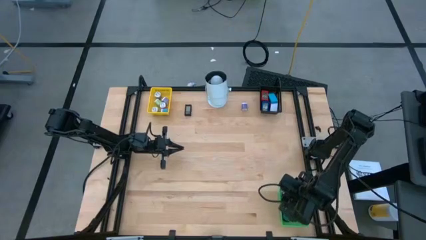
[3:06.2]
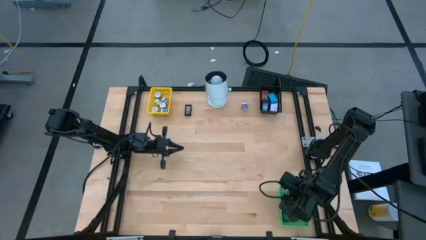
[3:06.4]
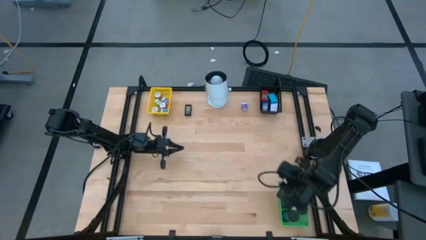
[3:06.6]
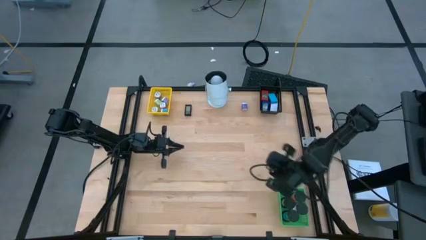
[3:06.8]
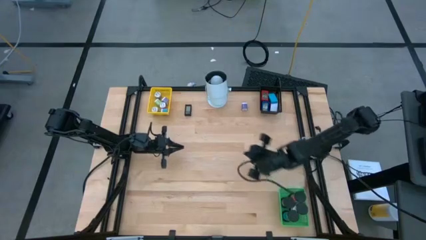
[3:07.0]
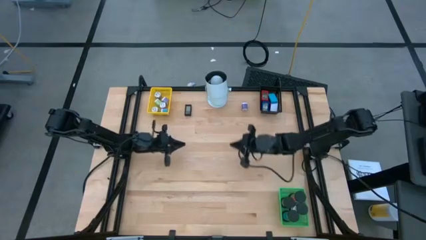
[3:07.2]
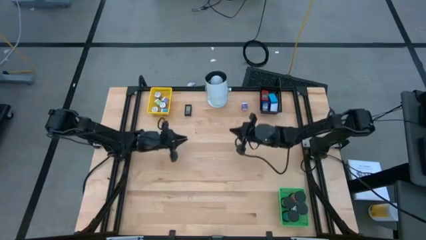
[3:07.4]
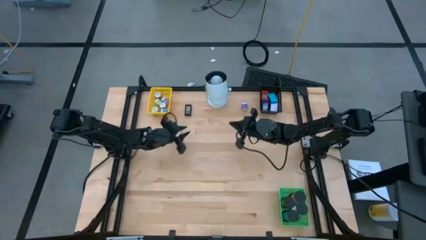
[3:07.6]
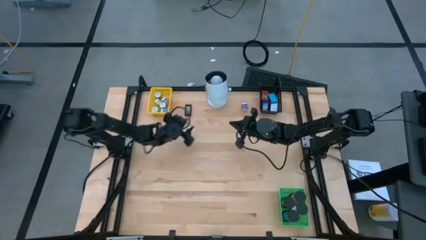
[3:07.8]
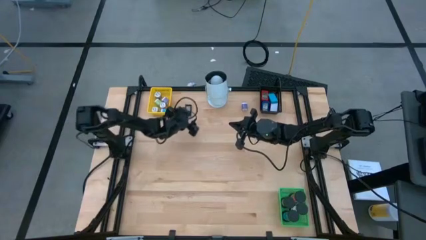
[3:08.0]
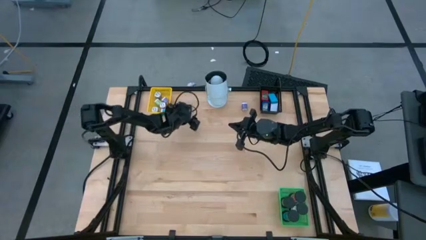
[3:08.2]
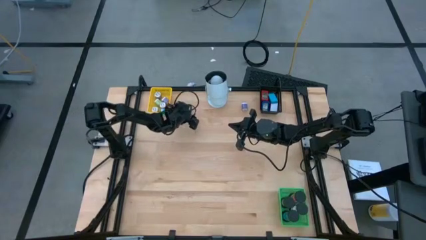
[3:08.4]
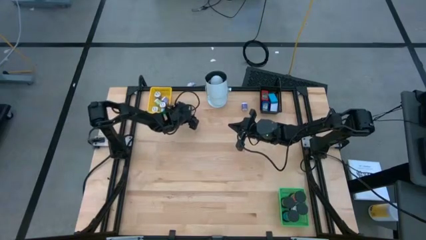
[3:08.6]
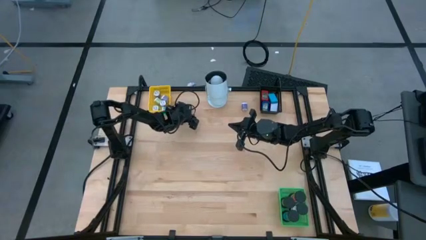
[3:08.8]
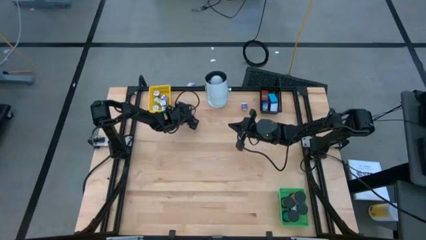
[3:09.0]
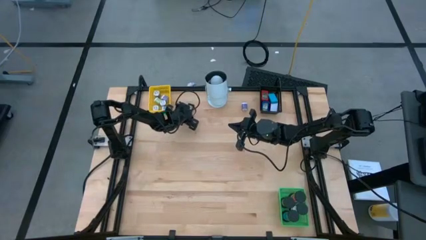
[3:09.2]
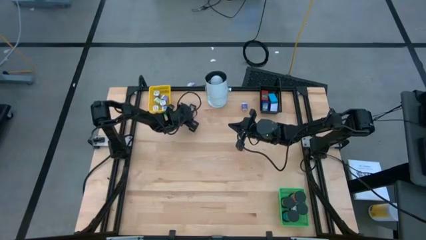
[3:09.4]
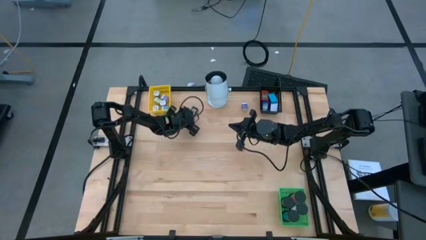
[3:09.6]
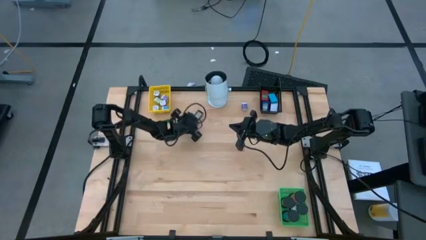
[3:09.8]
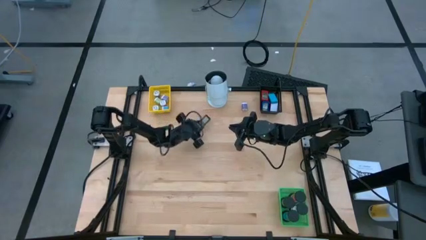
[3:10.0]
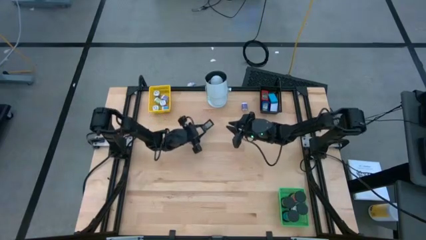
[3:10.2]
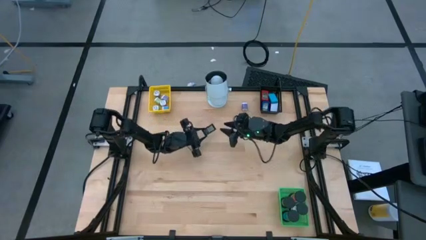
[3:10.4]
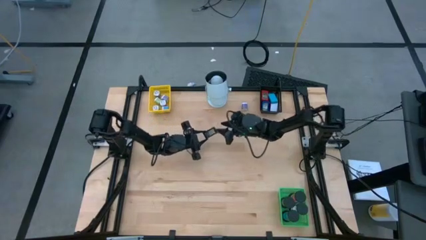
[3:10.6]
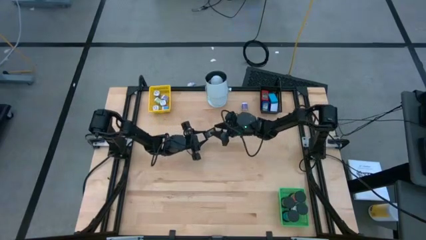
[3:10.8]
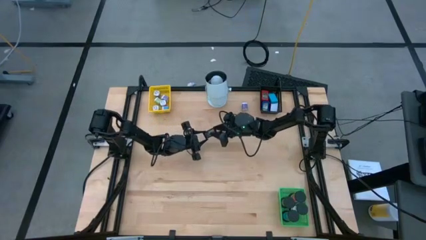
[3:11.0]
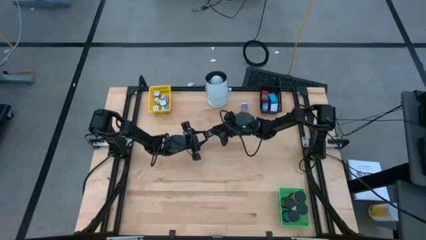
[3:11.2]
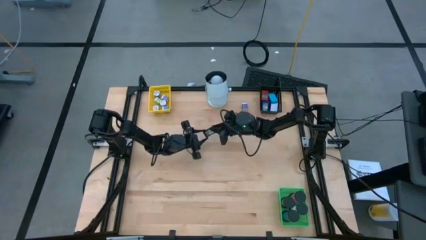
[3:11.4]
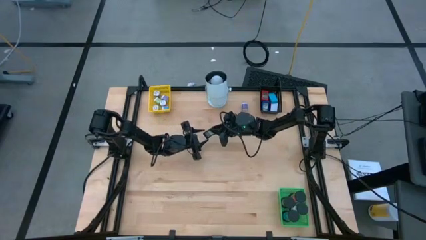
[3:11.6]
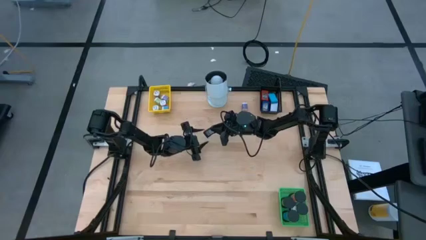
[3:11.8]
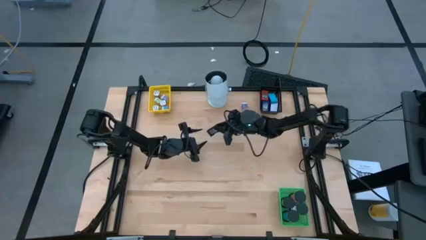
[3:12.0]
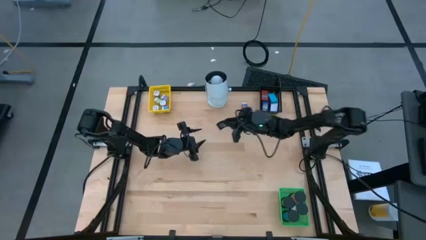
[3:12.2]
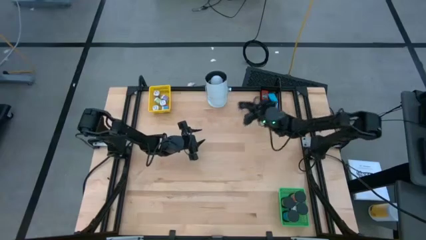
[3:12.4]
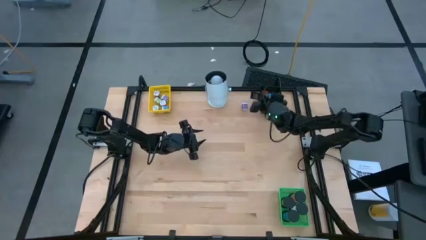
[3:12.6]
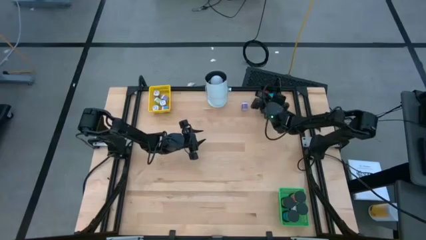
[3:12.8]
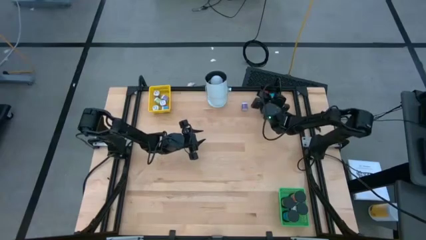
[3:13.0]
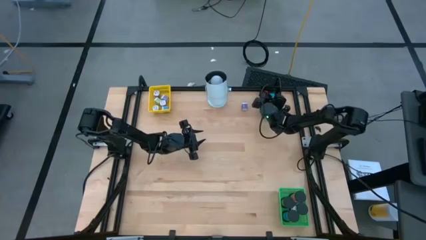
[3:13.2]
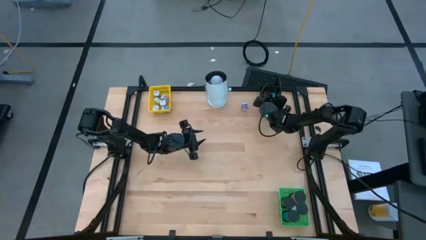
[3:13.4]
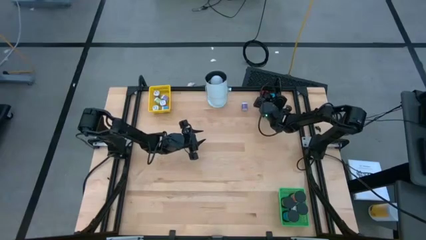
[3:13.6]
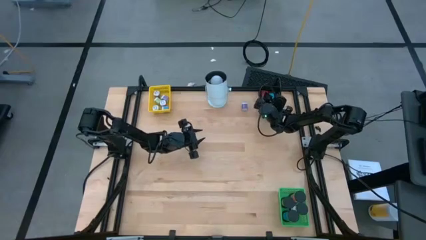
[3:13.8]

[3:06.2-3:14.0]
Task: Pick & Place Office items
Put the black timer into the black bin

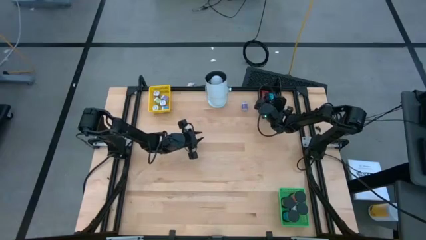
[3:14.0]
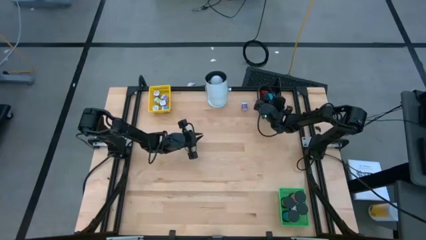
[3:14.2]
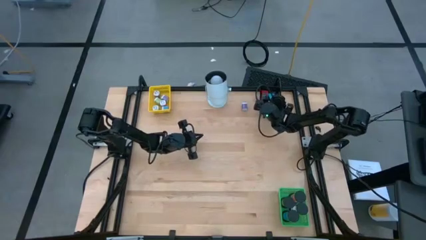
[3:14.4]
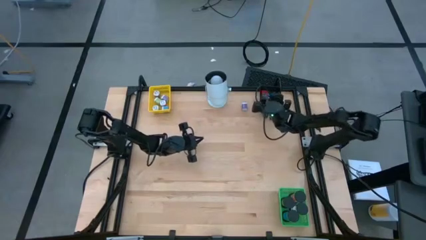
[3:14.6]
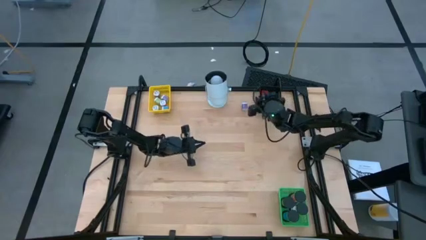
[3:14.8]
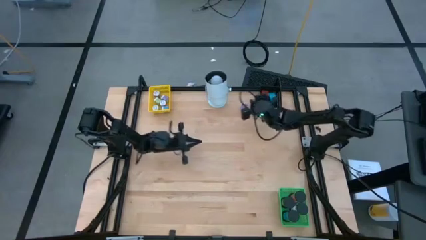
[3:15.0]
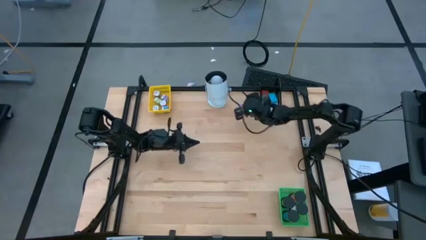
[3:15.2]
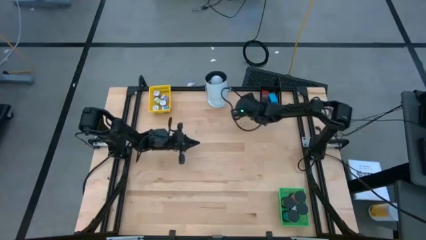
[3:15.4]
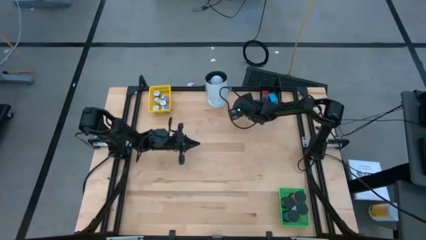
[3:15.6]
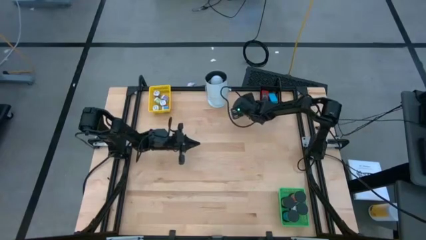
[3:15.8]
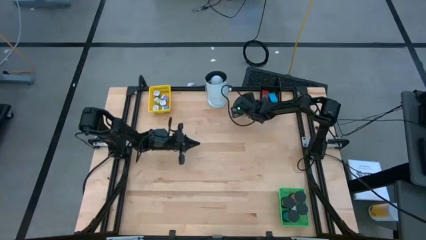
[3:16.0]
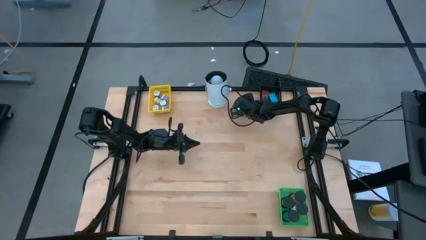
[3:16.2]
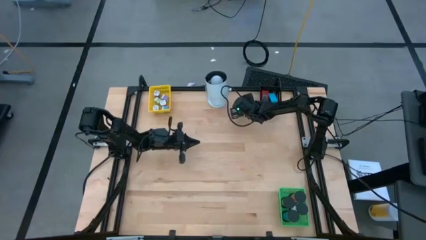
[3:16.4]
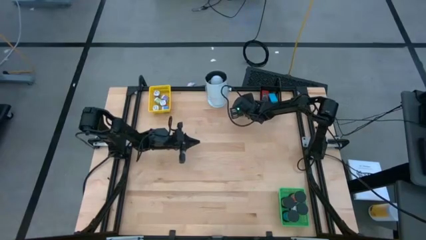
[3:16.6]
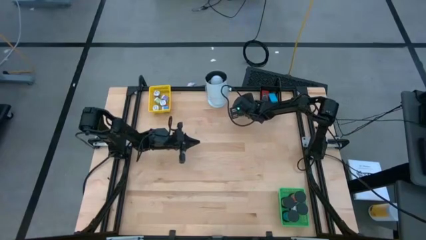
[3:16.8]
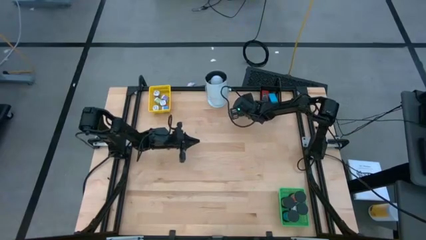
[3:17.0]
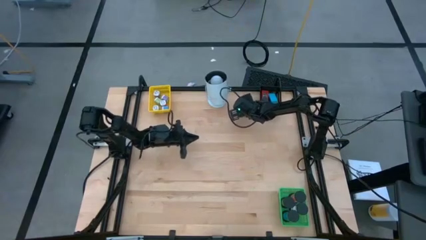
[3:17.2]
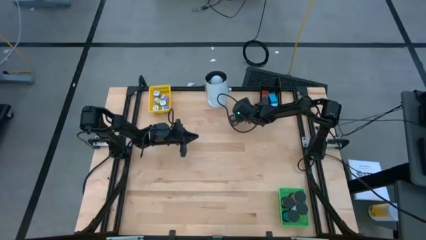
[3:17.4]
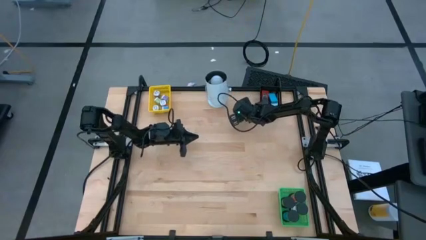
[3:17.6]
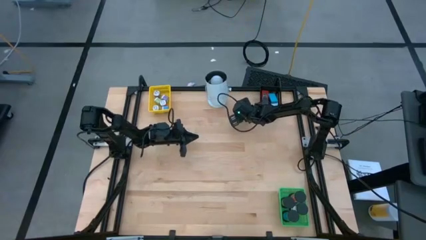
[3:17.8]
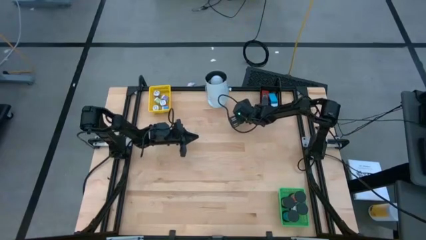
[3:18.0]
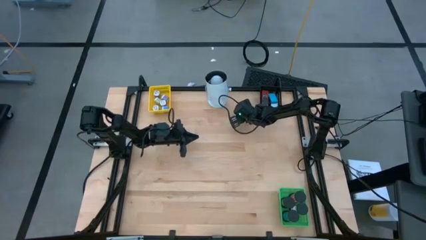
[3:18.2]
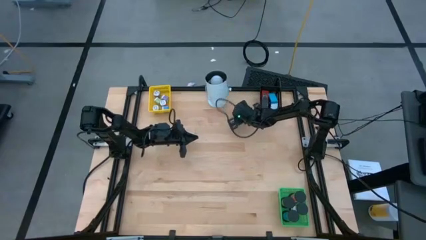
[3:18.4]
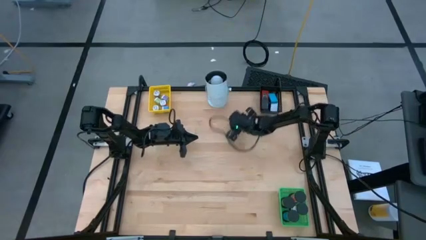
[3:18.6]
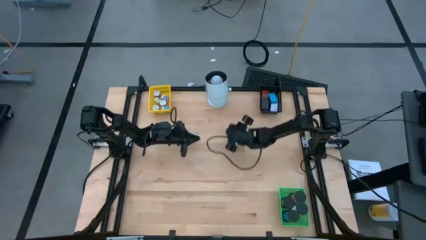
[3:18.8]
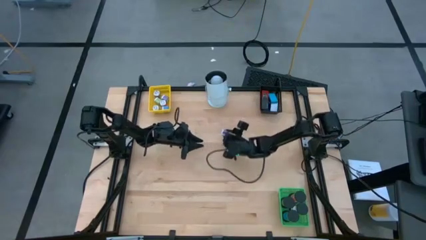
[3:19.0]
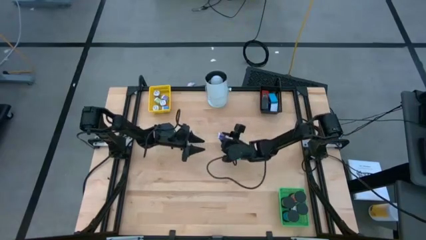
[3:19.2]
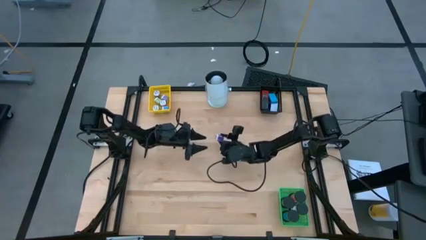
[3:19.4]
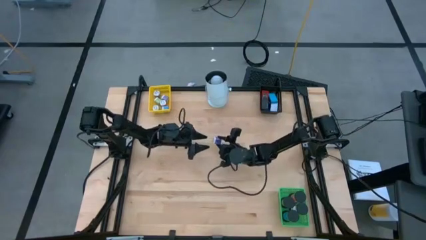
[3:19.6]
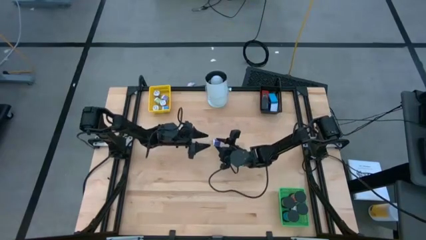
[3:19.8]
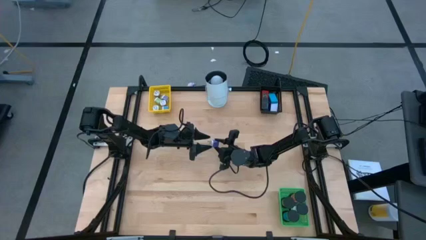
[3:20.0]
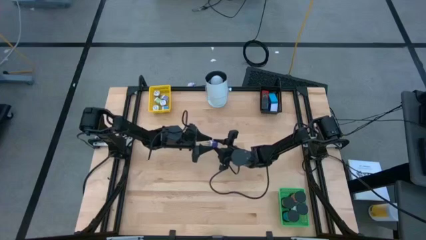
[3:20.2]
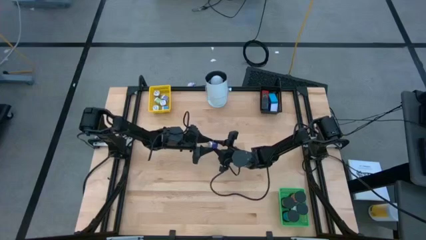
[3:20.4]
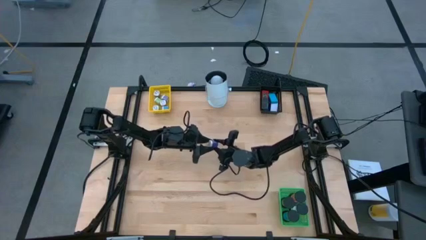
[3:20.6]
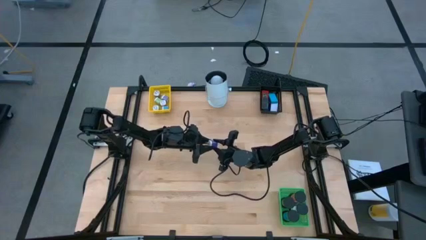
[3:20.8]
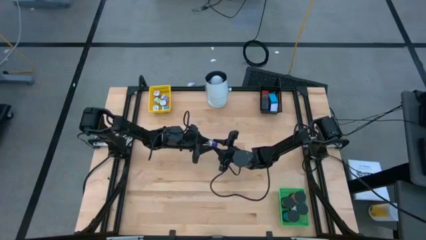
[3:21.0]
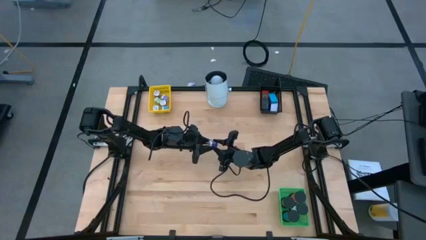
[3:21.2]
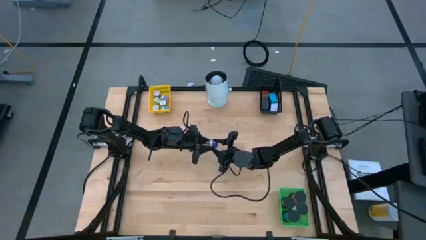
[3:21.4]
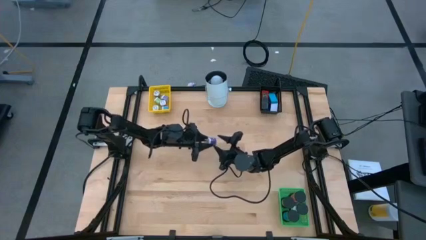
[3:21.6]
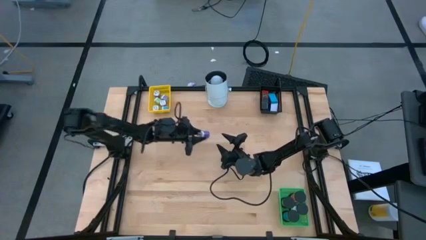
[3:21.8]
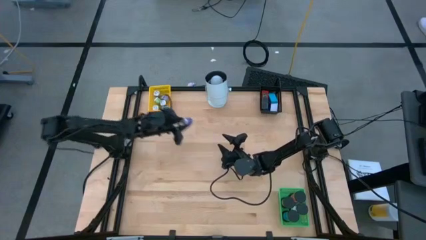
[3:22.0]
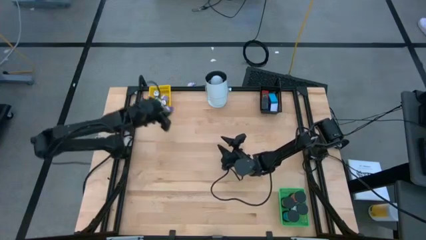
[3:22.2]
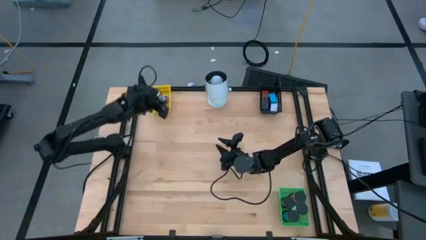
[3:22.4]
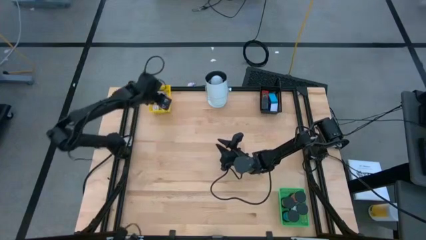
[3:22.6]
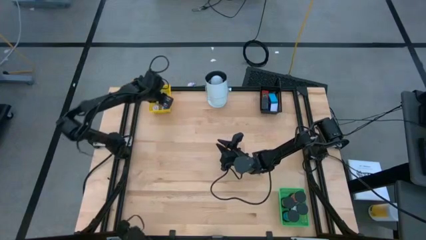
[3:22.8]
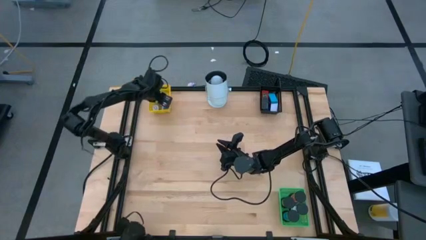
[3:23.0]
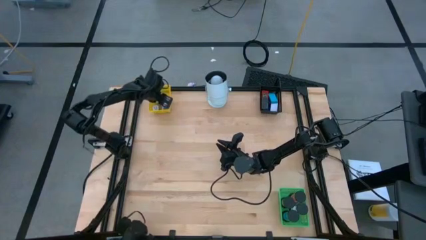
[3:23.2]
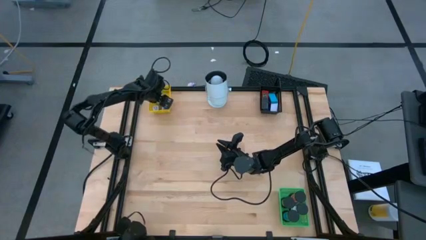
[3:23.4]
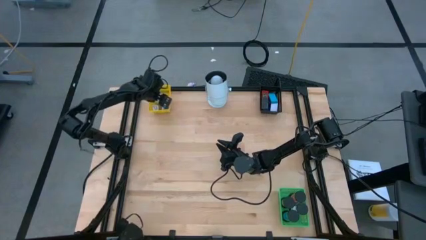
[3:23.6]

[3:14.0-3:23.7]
Put the violet charger adapter into the yellow bin
